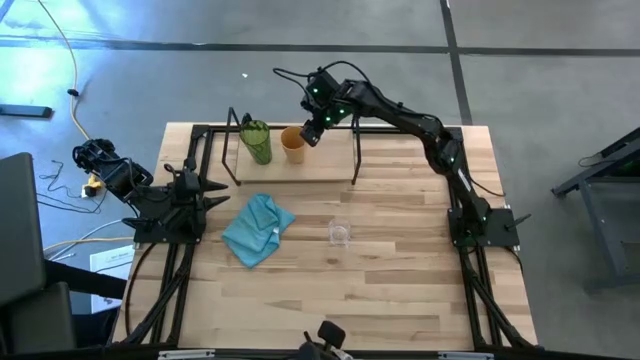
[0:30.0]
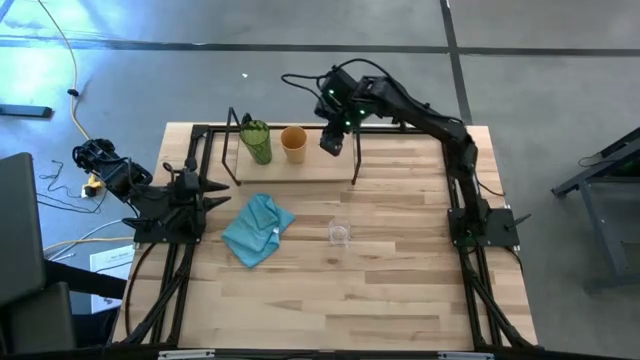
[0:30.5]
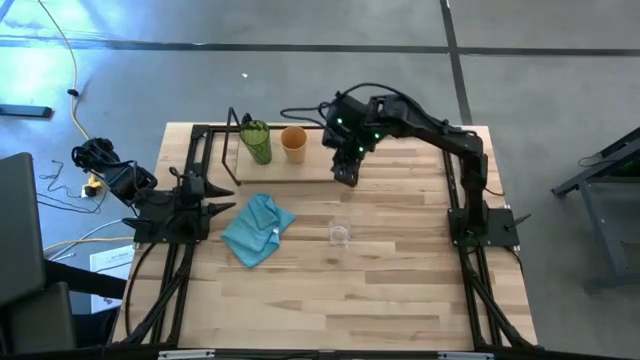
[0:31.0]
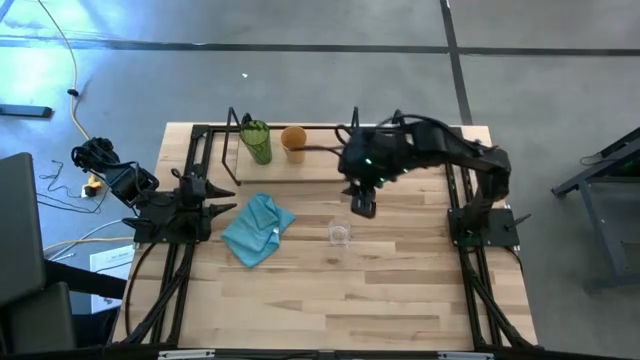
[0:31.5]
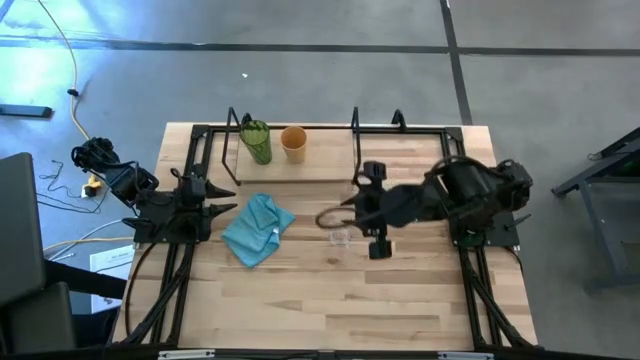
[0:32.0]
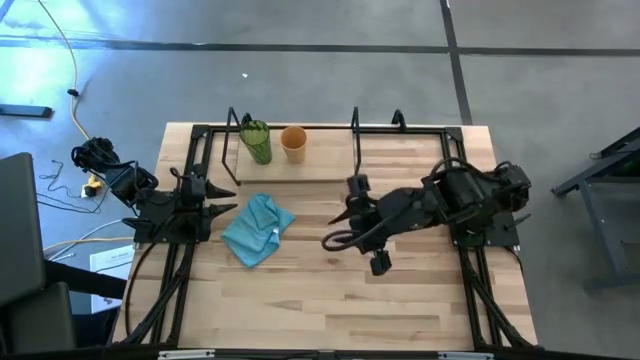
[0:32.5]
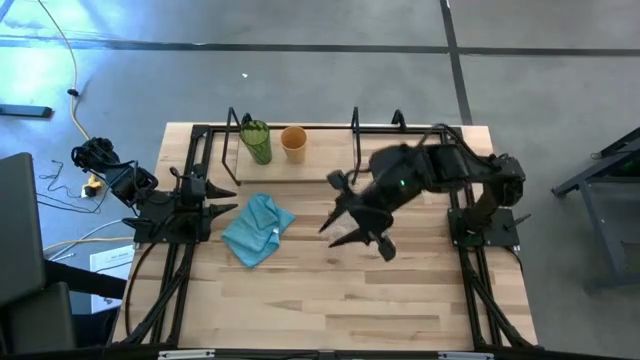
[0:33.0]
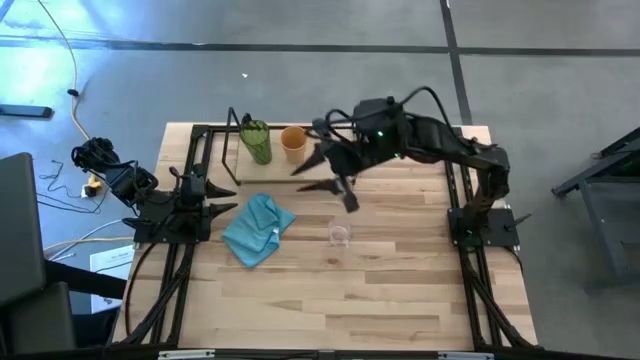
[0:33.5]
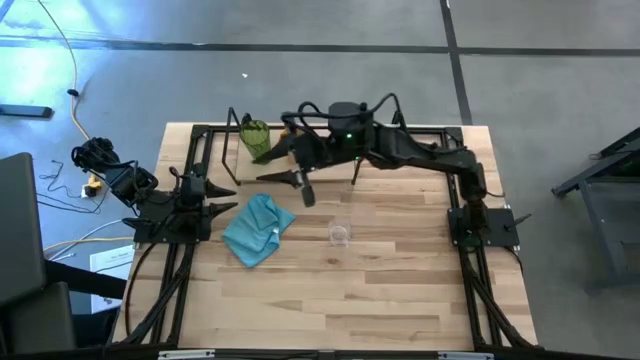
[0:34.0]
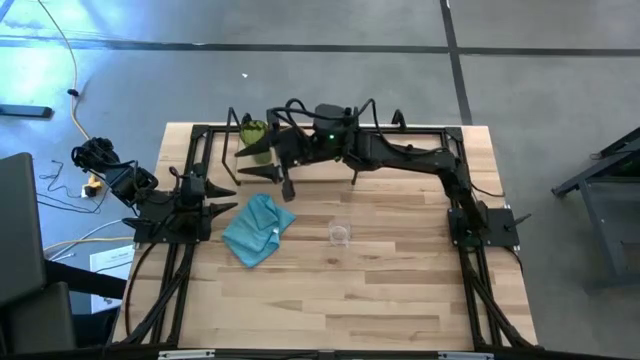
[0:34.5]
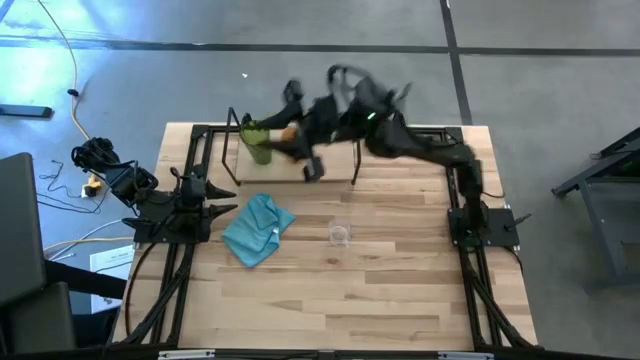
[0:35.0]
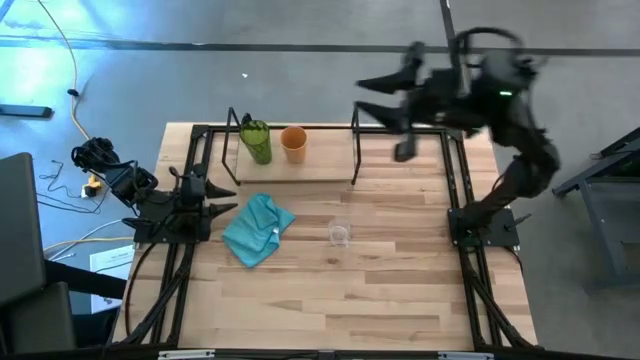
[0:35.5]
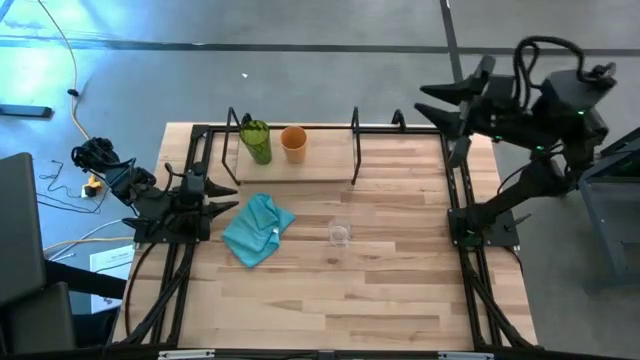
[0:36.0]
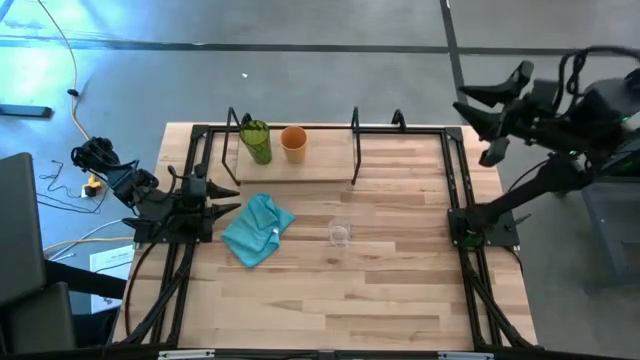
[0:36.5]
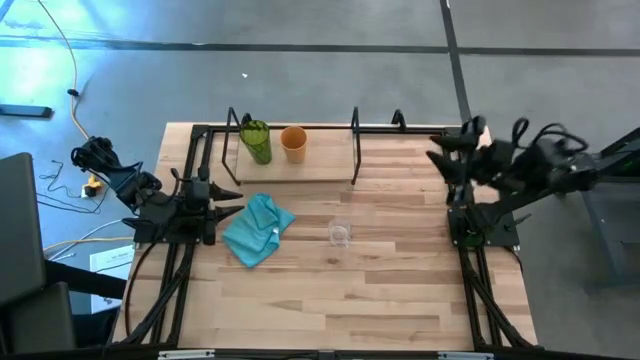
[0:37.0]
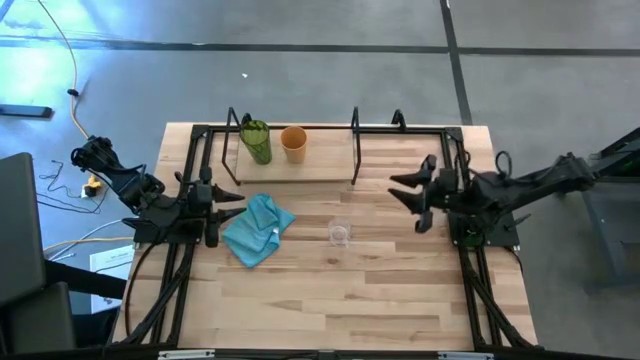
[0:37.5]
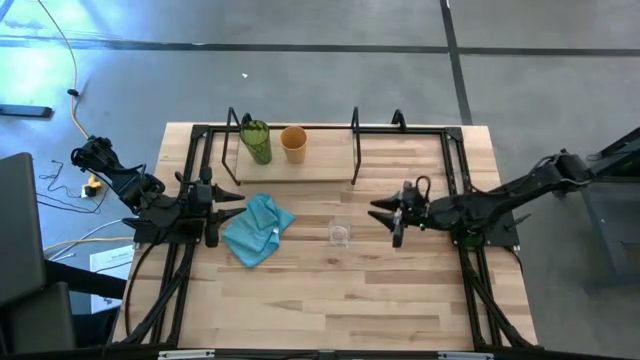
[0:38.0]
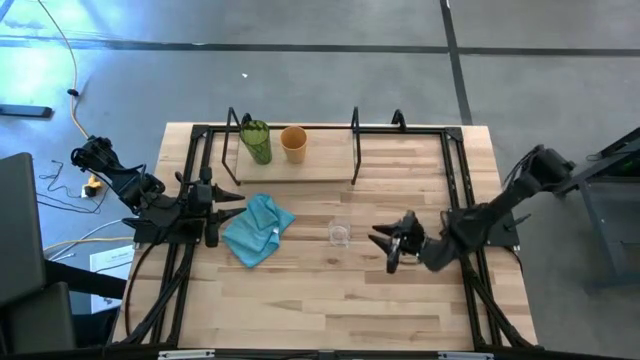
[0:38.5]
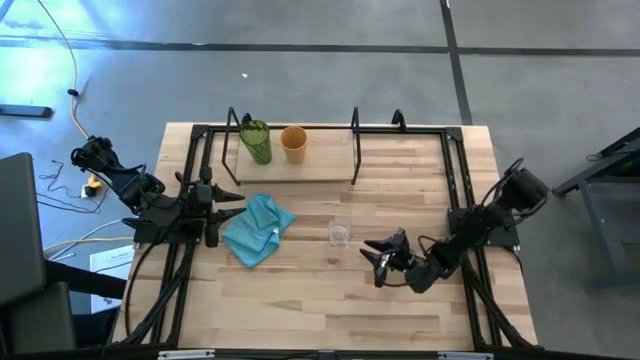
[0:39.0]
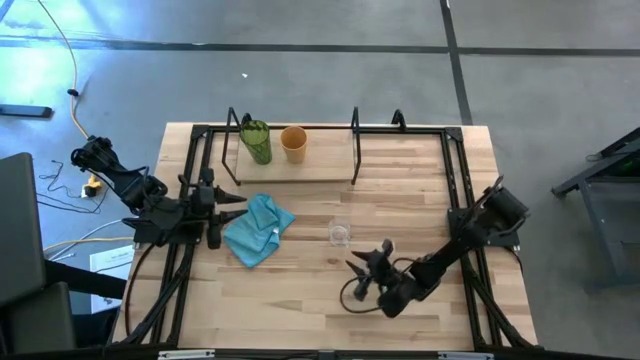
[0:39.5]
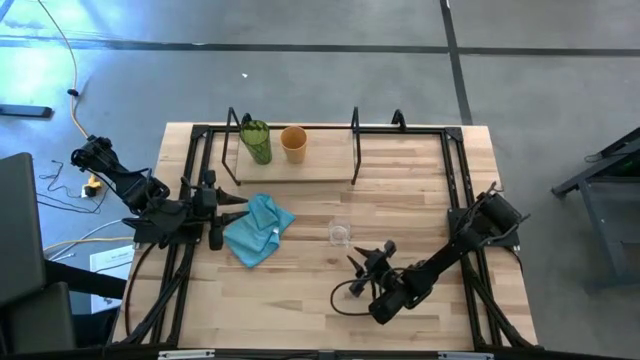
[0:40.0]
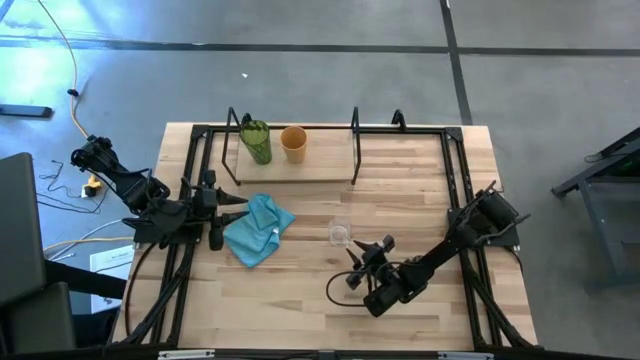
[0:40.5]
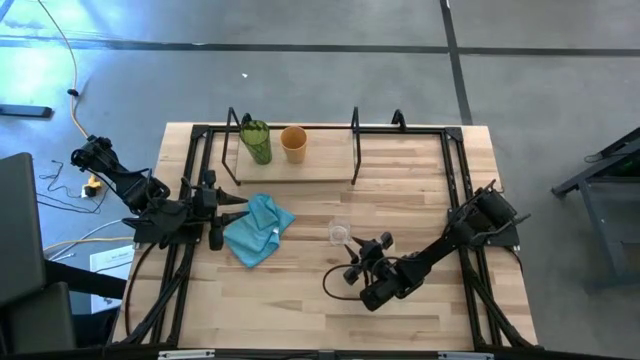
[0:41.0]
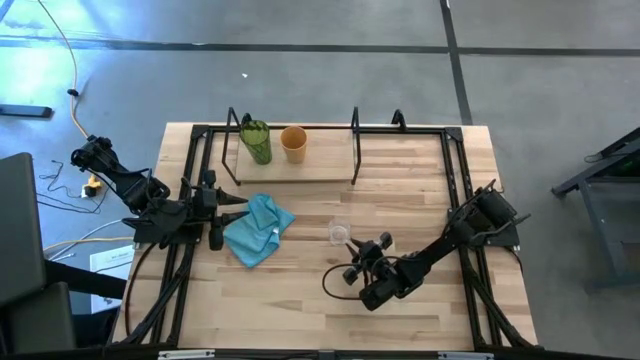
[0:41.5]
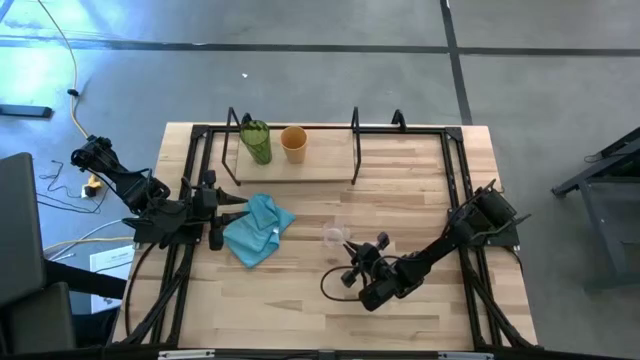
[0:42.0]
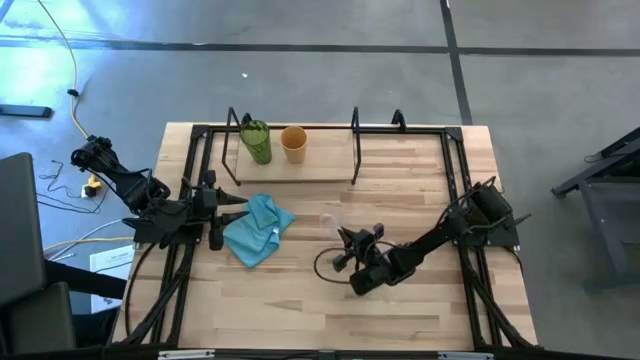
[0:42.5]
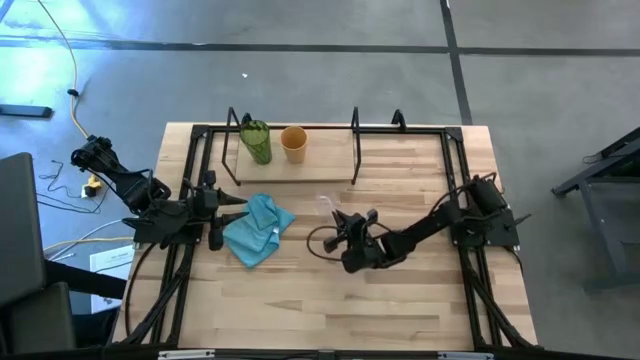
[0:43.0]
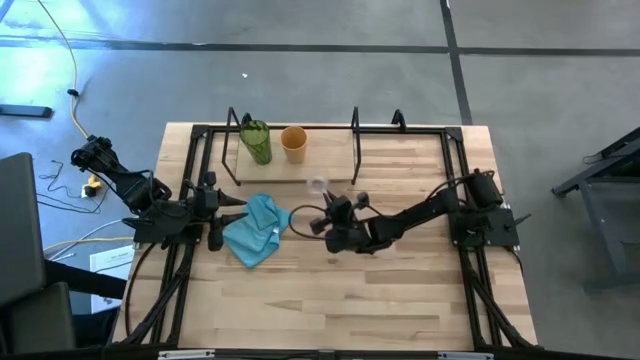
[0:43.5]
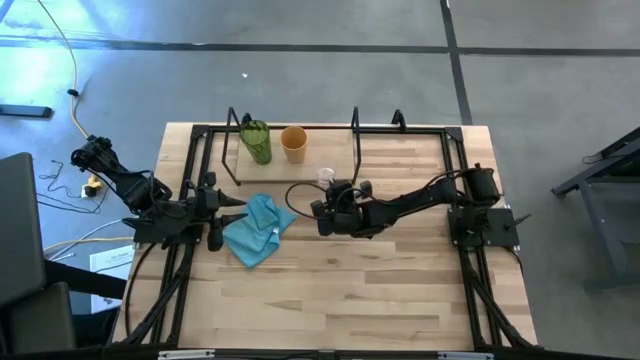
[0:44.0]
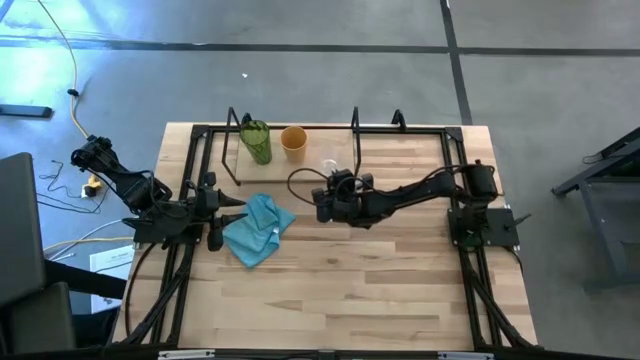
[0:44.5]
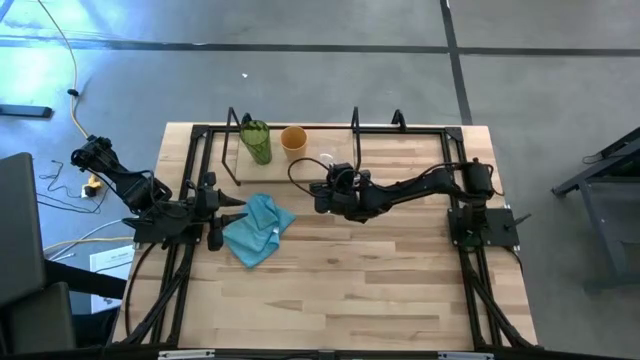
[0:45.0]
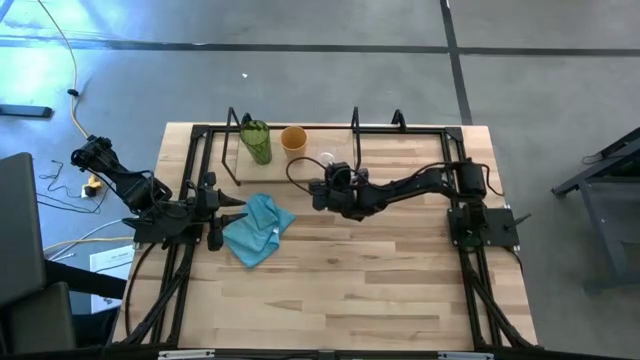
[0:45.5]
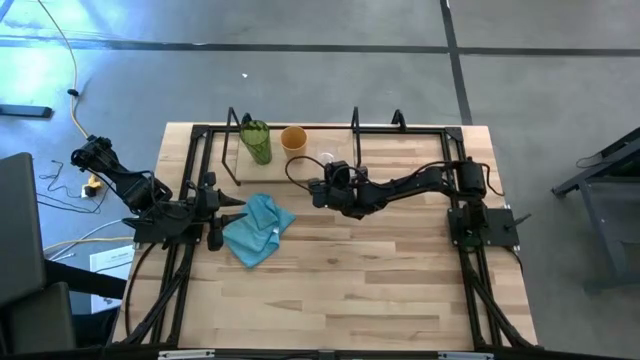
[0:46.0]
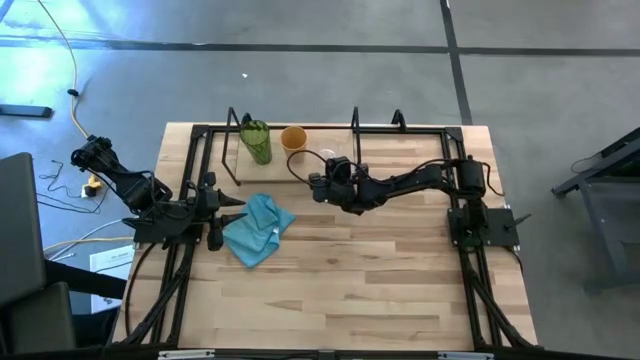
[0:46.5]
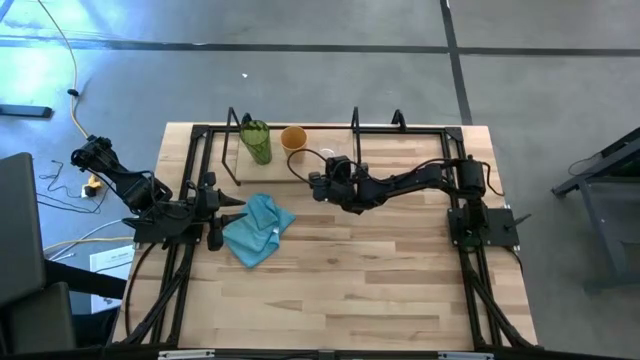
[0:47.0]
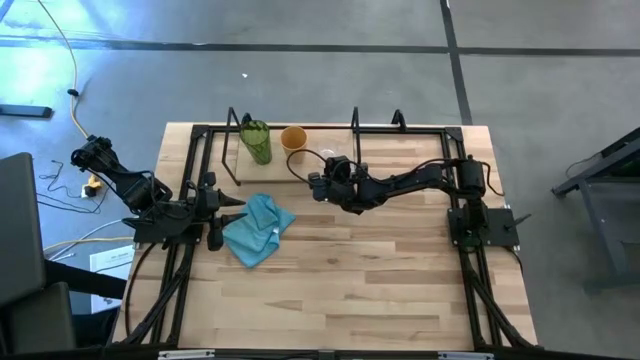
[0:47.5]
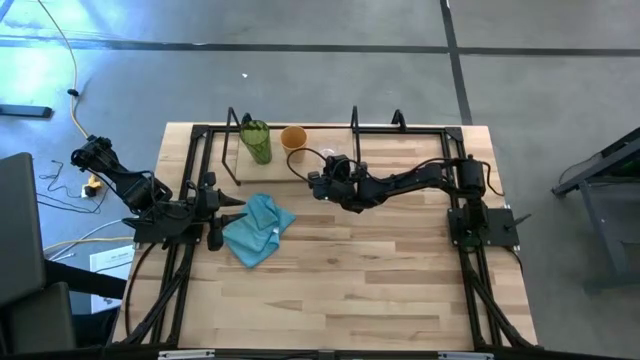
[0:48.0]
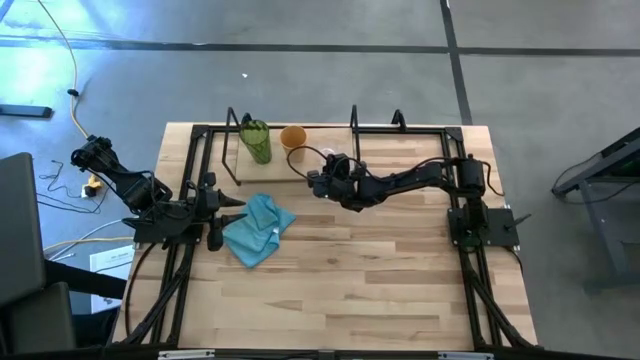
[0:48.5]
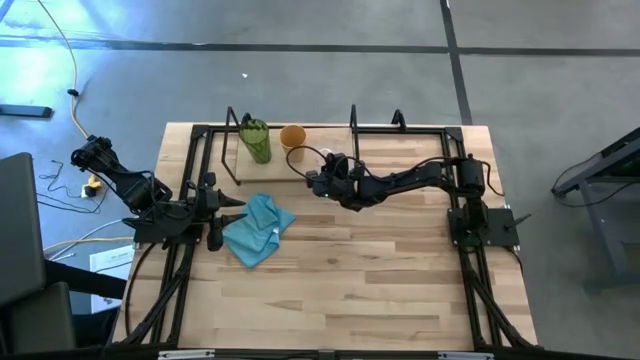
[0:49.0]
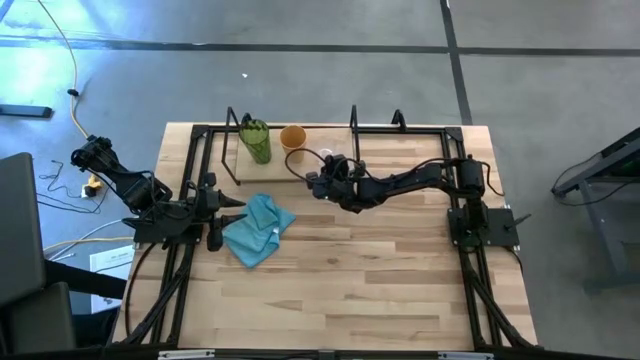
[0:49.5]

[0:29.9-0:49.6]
Task: Stack small to large cups/mugs on shelf
Put the transparent mug on the shelf
